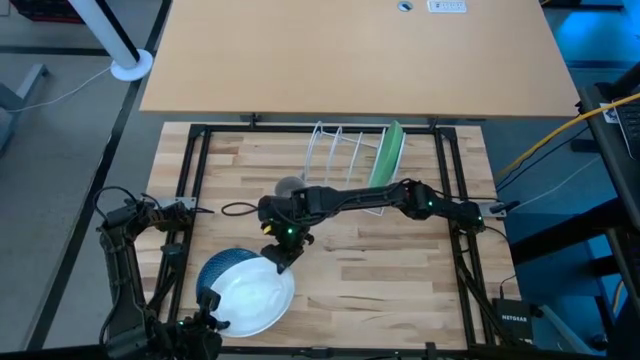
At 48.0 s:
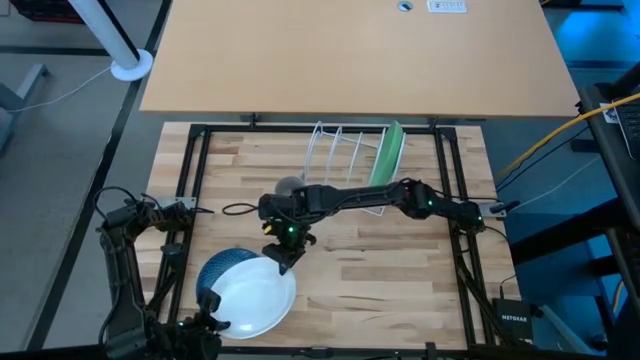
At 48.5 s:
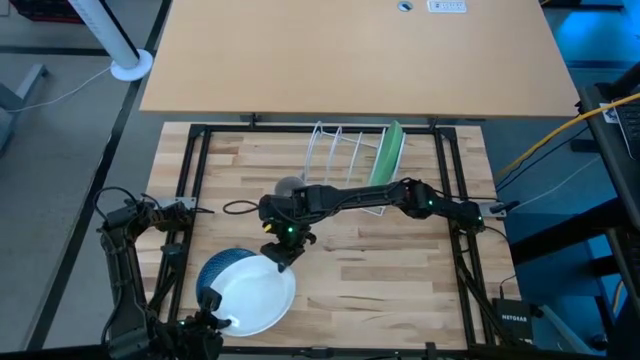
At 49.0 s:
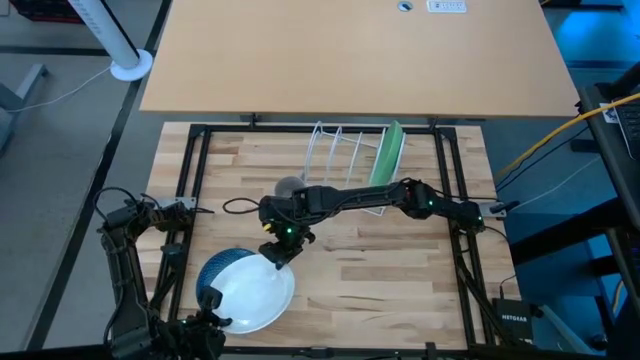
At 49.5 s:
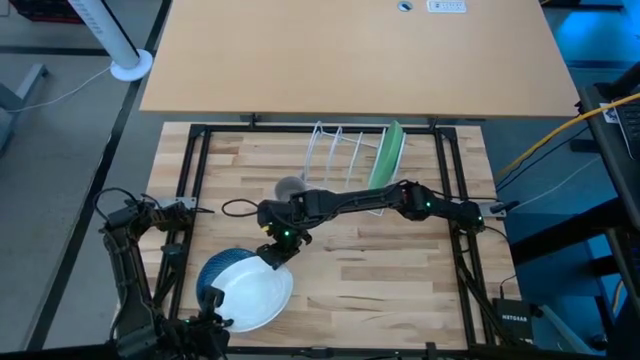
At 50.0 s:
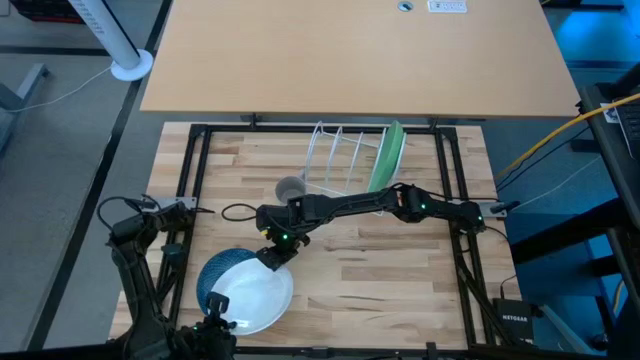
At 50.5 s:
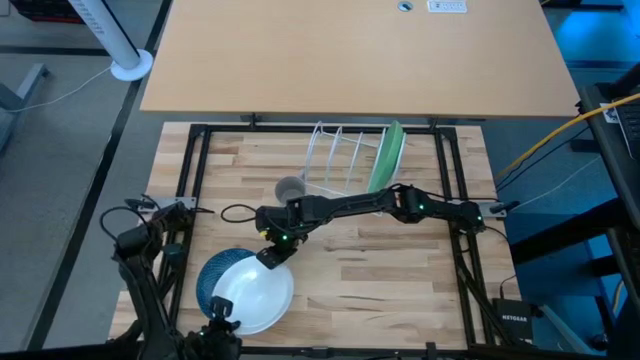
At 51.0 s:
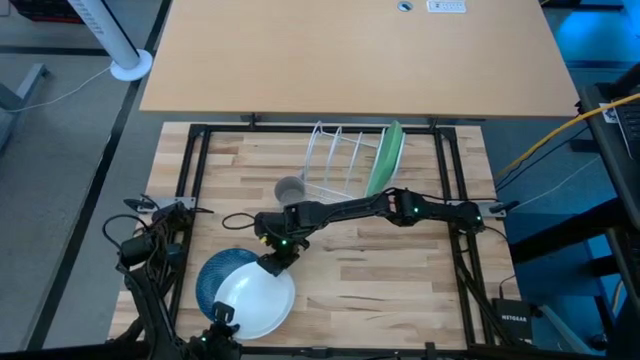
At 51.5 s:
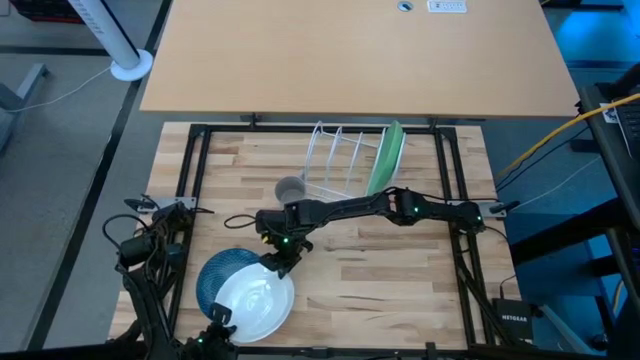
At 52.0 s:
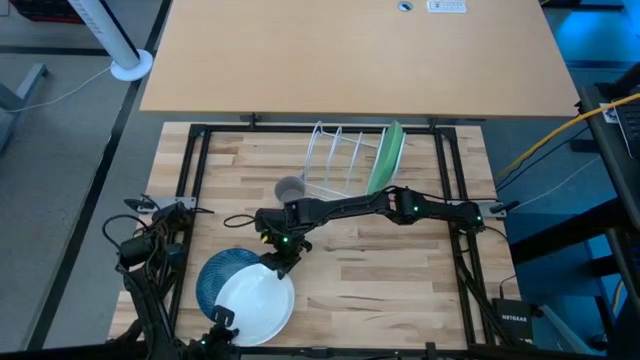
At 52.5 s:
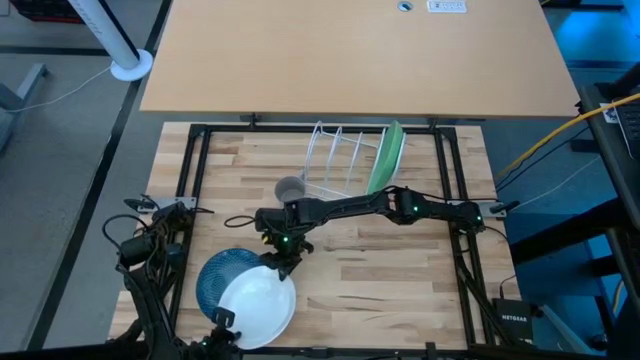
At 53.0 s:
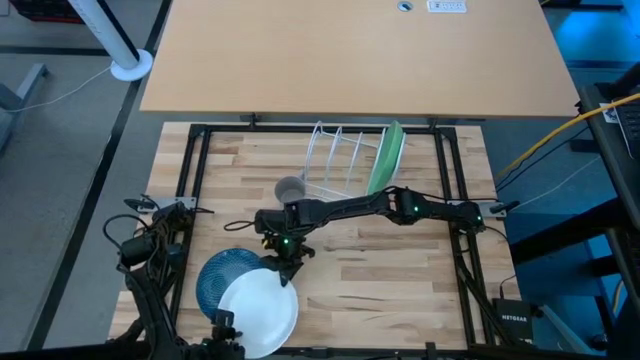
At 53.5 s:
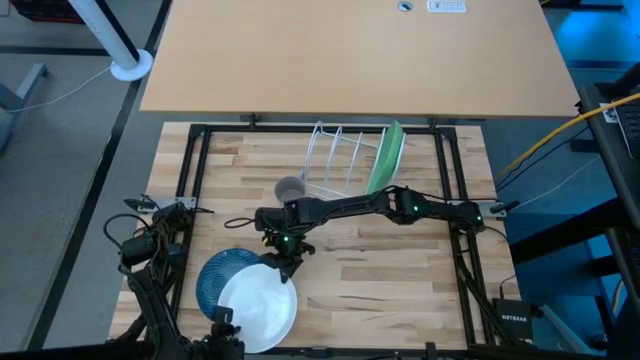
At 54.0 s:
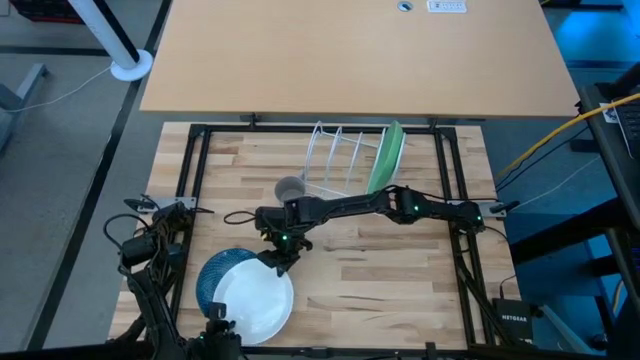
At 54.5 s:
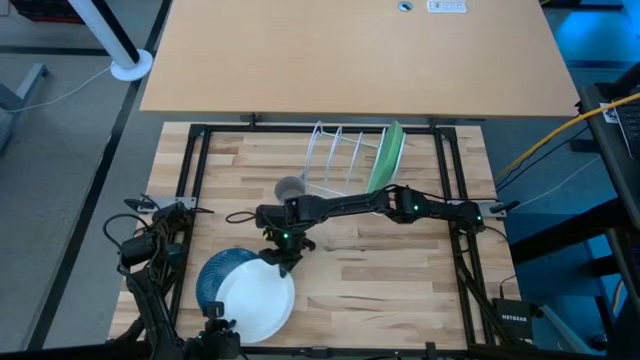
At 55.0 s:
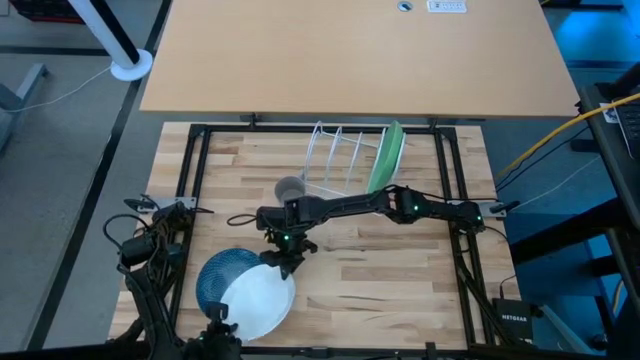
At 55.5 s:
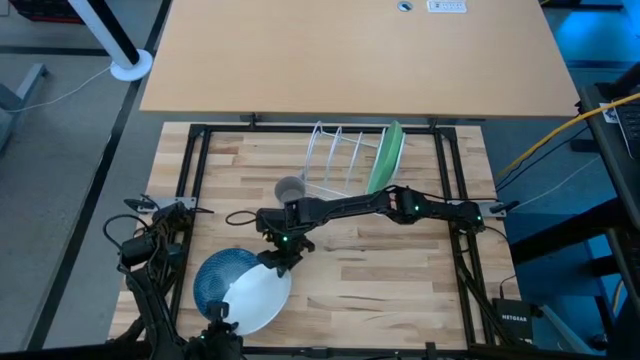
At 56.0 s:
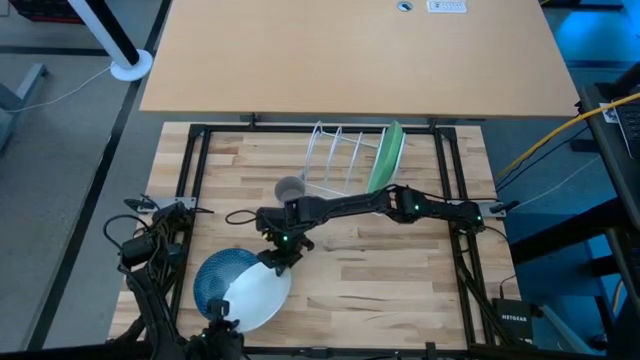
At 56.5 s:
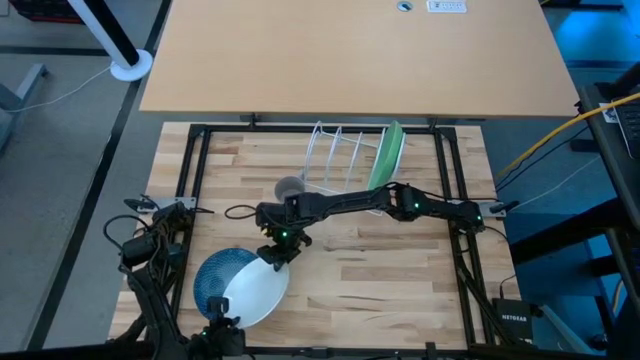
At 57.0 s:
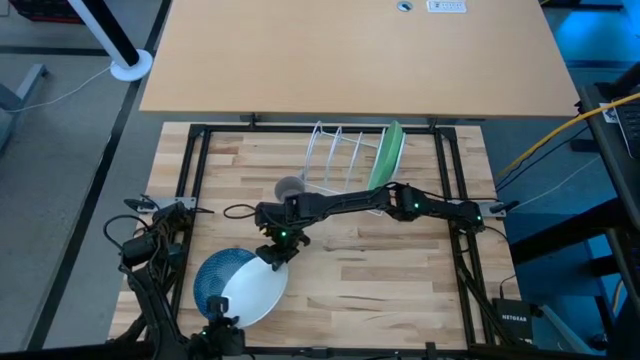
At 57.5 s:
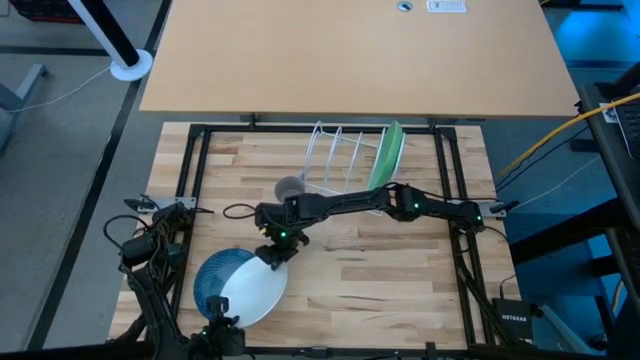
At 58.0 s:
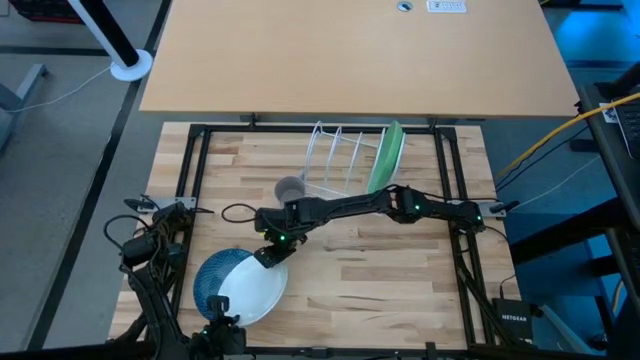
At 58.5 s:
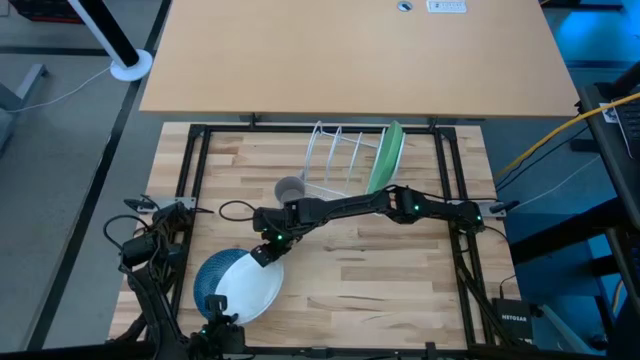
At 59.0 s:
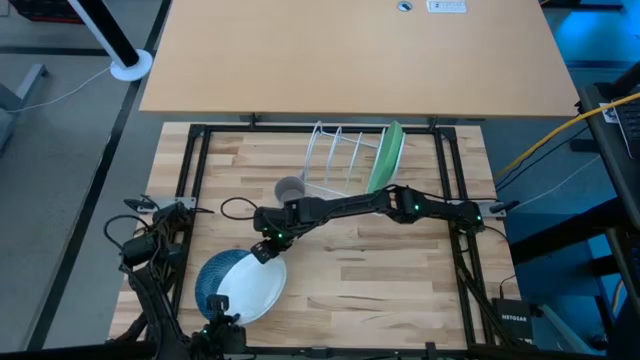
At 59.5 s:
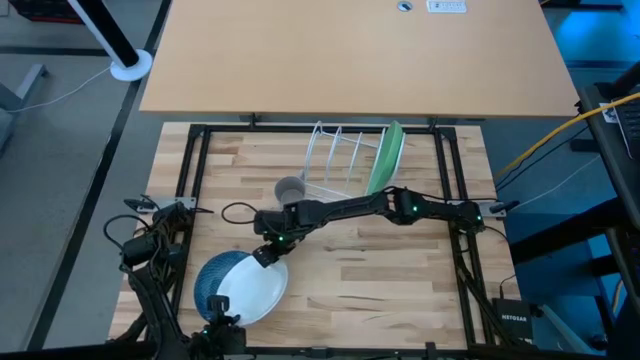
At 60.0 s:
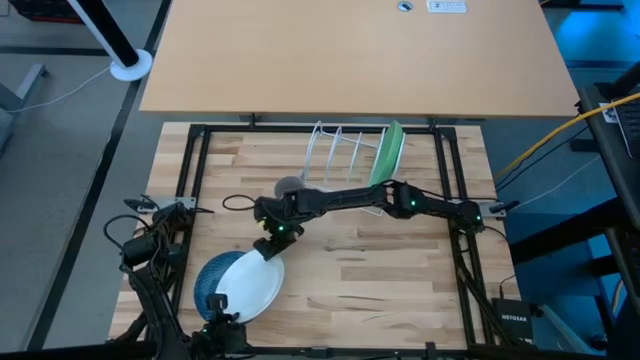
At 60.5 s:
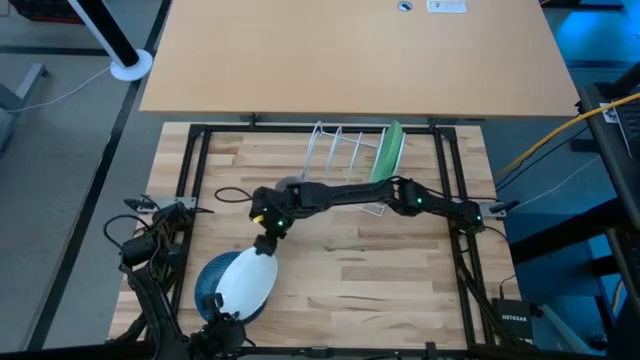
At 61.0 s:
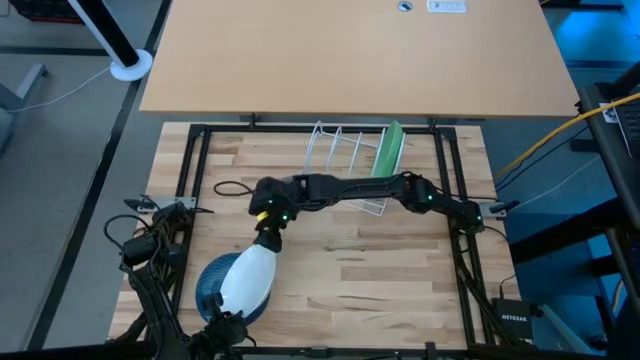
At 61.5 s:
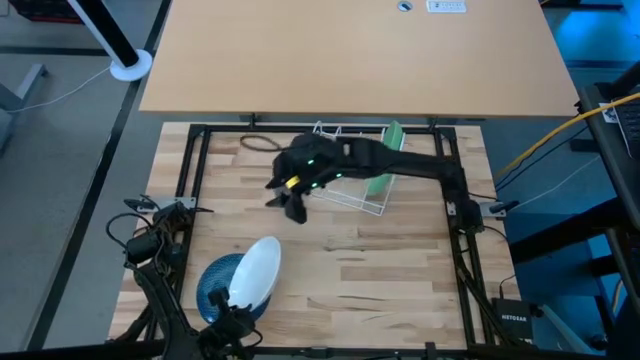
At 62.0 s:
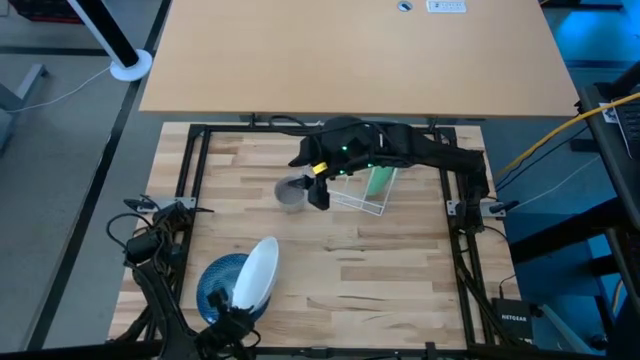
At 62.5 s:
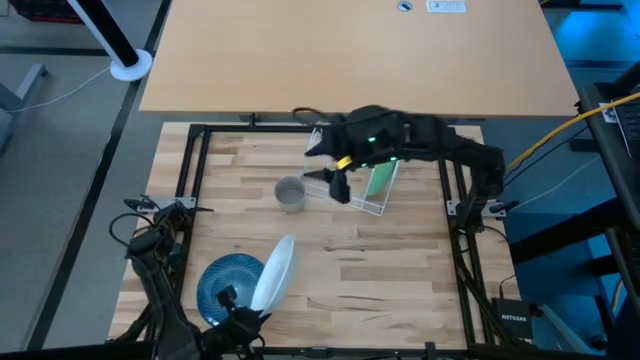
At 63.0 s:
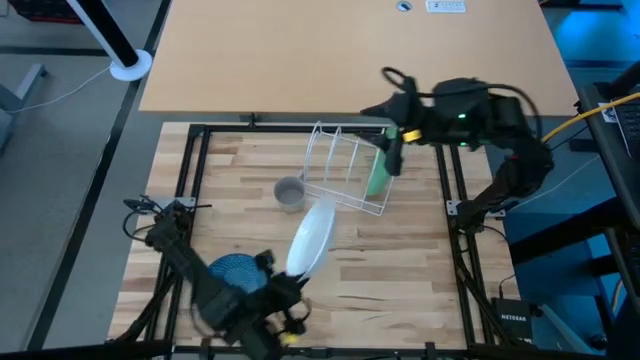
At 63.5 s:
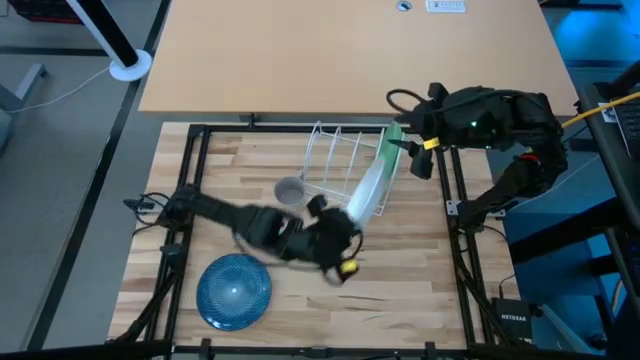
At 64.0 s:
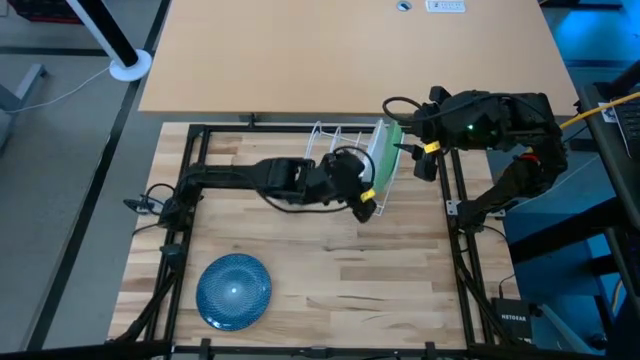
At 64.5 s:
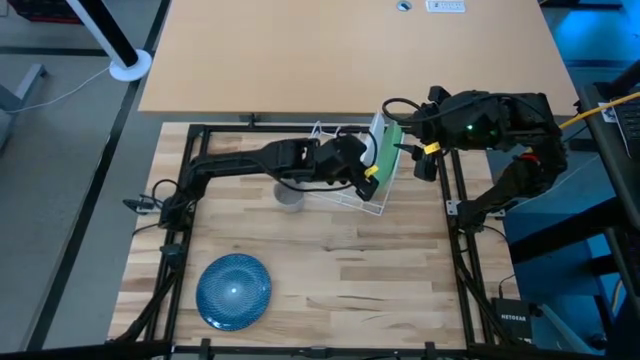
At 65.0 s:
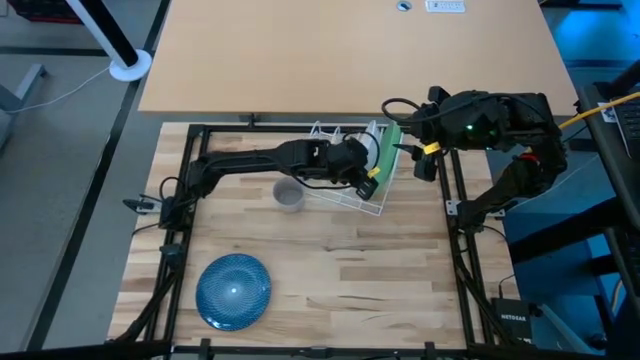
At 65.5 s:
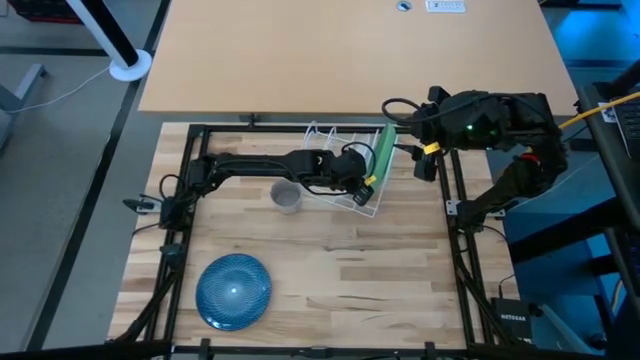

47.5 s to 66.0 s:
Task: Sort dishes
Put the white plate in the dish rack

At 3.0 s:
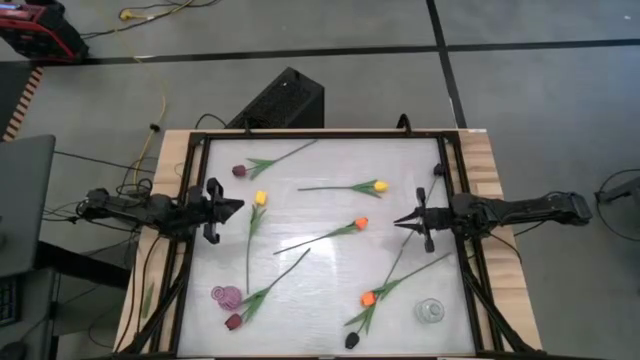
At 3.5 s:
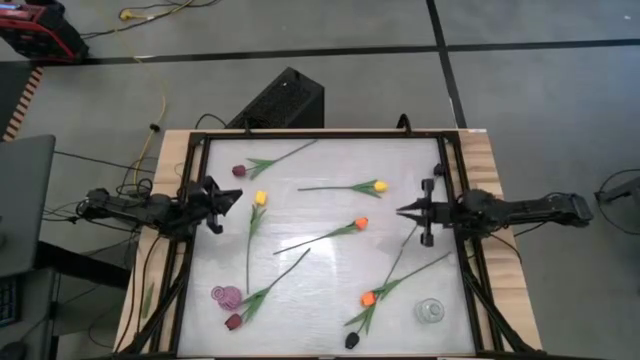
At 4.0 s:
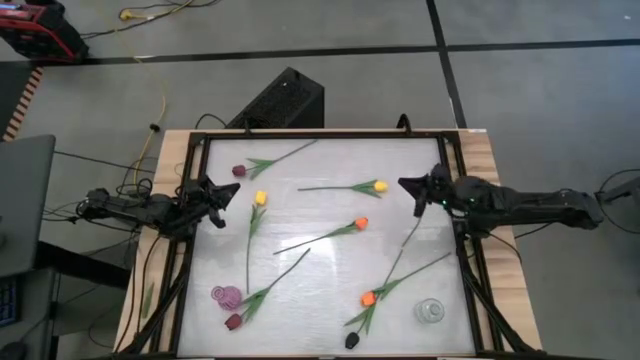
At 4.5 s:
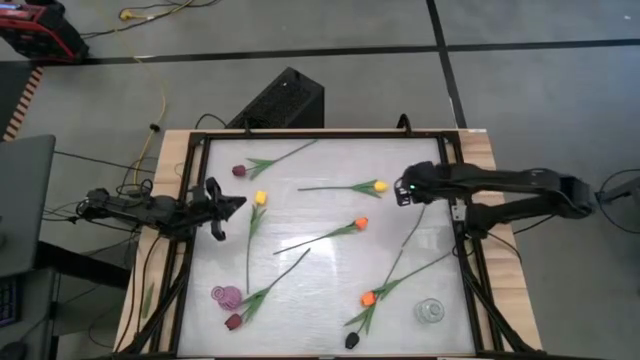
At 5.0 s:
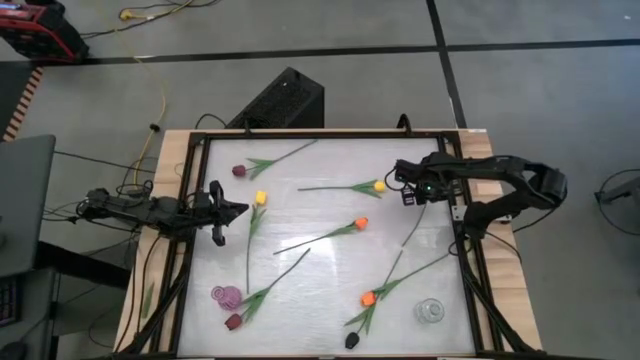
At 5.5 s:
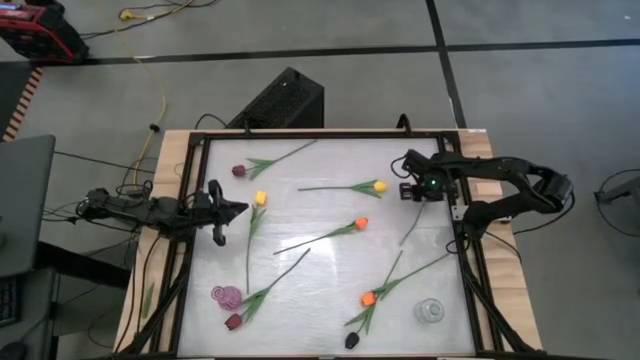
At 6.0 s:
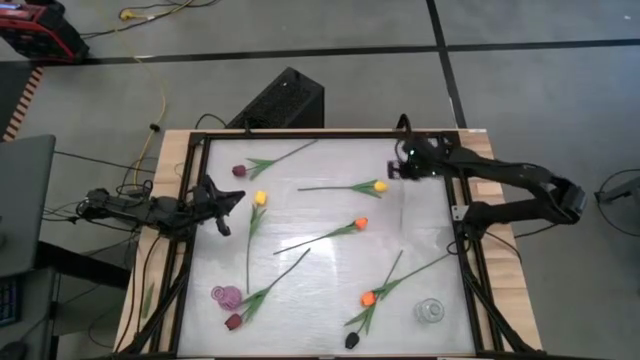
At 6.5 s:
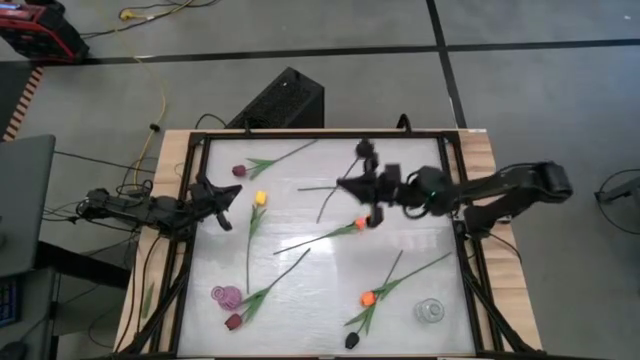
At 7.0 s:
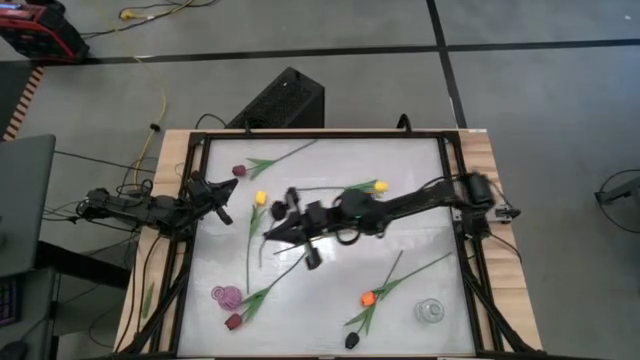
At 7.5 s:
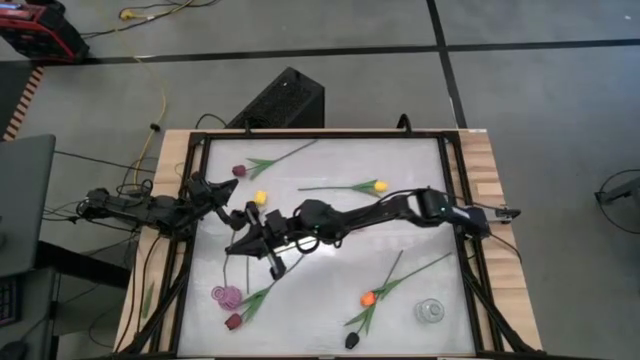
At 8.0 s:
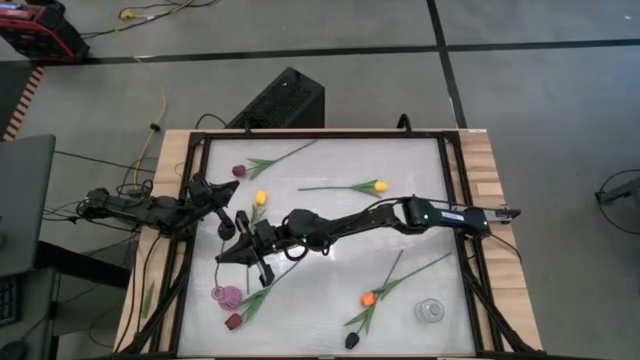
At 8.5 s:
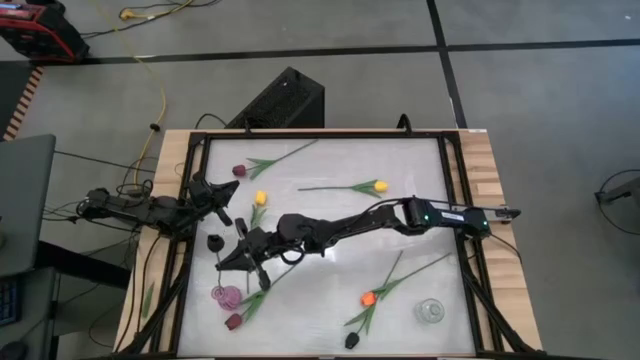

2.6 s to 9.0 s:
Task: Sort flowers into vase by color
Put the top black flower into the pink flower vase
